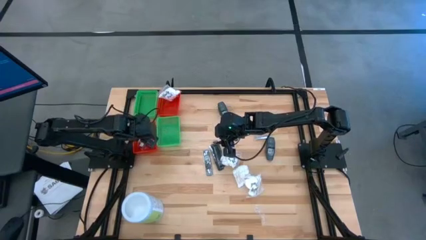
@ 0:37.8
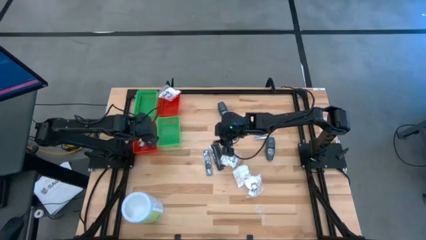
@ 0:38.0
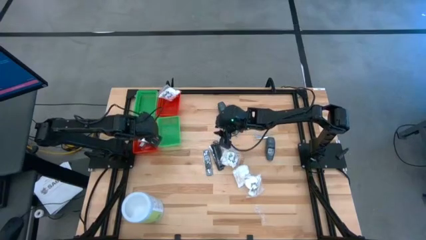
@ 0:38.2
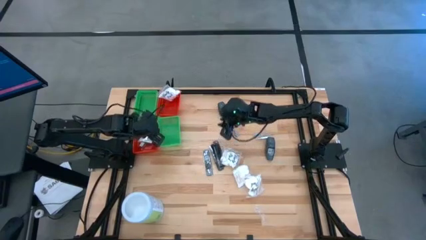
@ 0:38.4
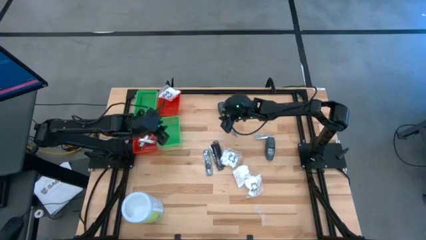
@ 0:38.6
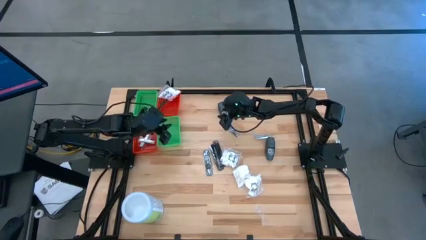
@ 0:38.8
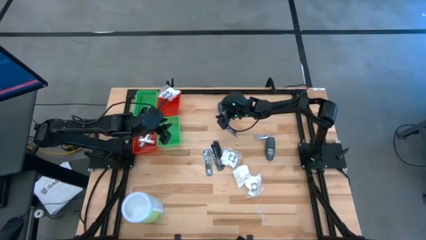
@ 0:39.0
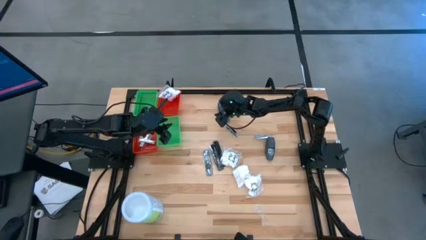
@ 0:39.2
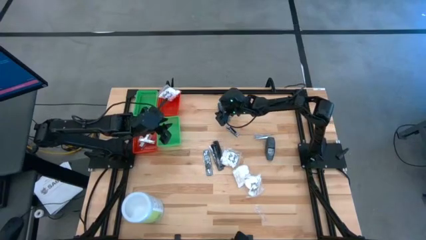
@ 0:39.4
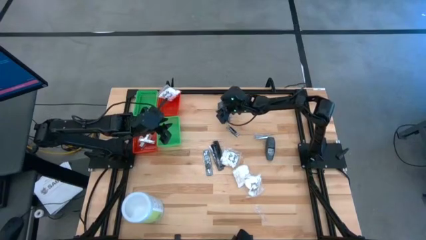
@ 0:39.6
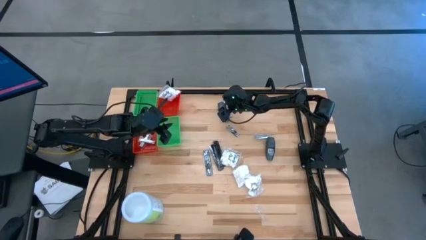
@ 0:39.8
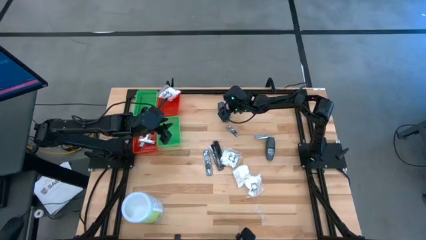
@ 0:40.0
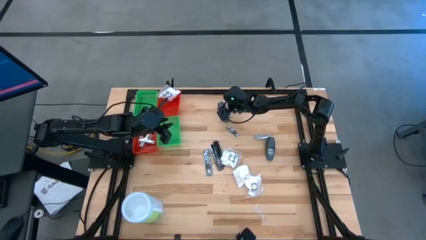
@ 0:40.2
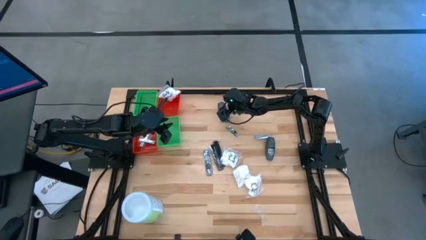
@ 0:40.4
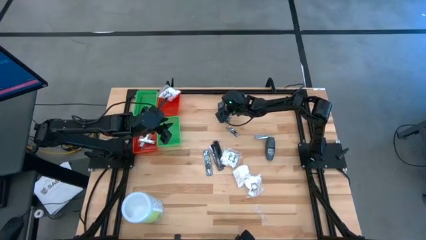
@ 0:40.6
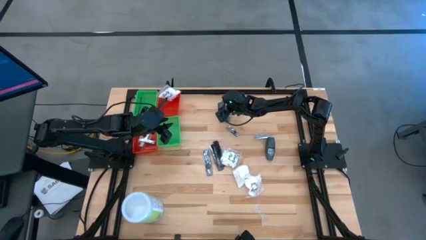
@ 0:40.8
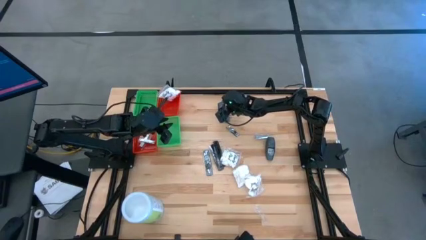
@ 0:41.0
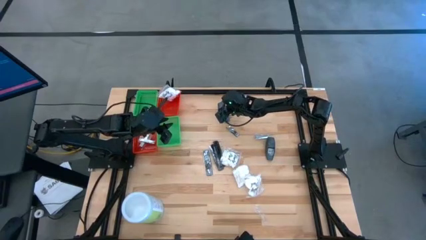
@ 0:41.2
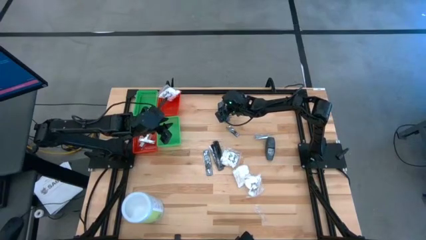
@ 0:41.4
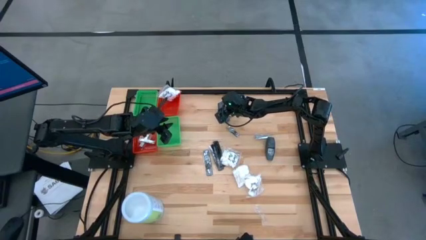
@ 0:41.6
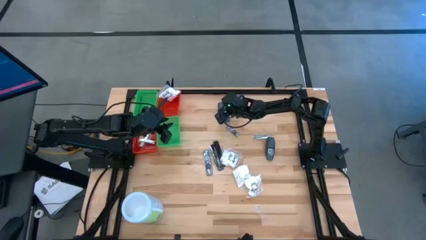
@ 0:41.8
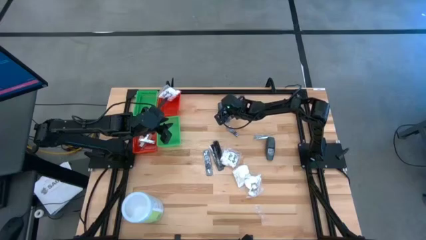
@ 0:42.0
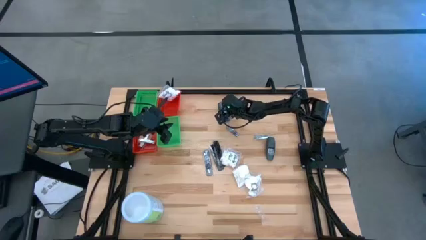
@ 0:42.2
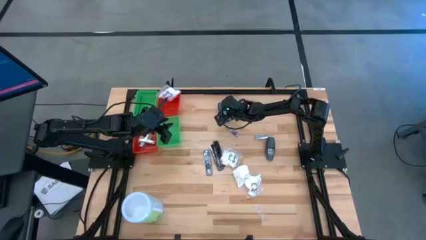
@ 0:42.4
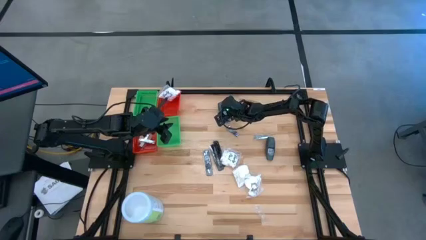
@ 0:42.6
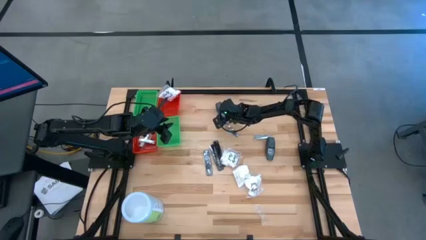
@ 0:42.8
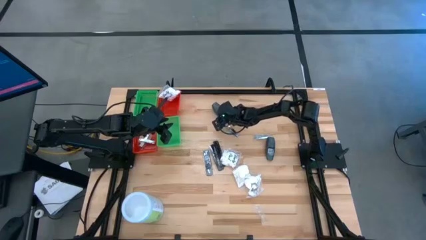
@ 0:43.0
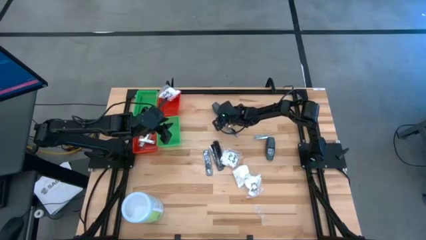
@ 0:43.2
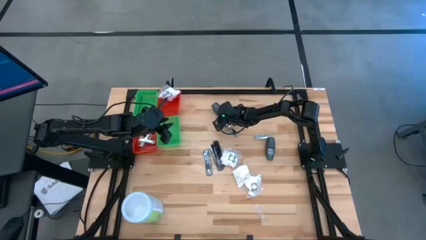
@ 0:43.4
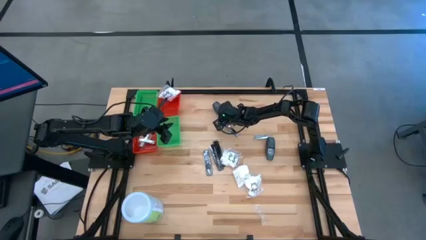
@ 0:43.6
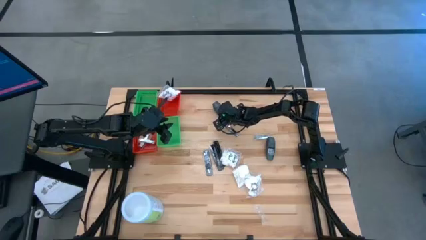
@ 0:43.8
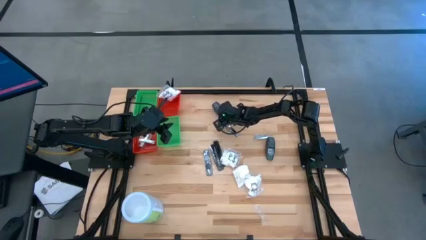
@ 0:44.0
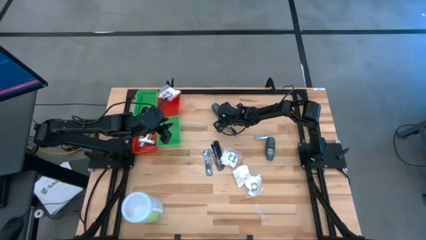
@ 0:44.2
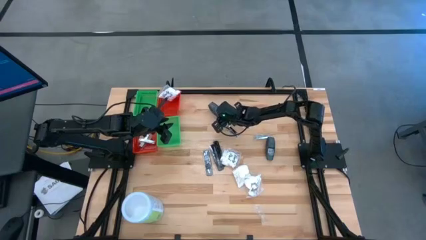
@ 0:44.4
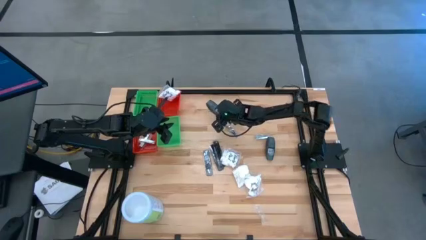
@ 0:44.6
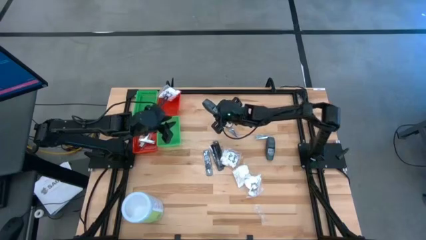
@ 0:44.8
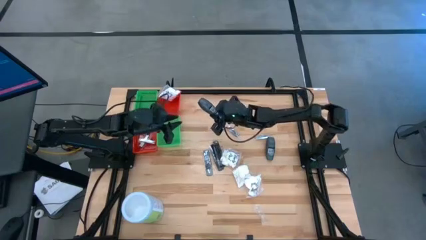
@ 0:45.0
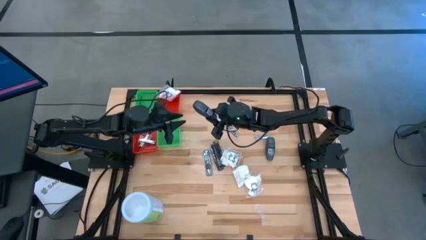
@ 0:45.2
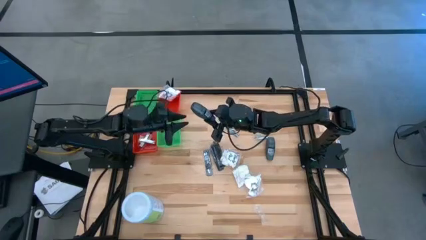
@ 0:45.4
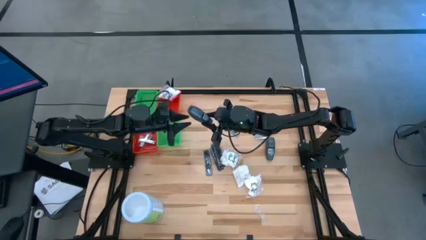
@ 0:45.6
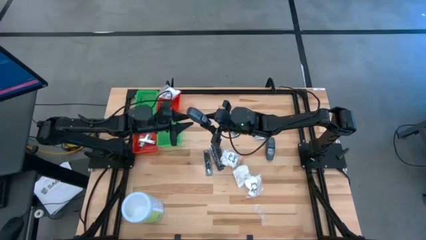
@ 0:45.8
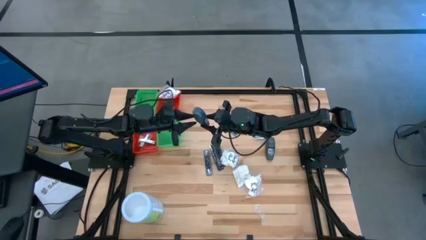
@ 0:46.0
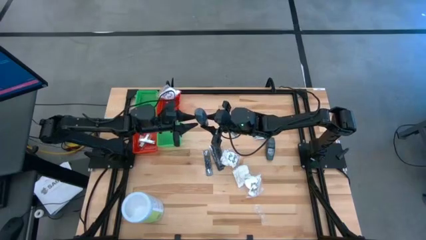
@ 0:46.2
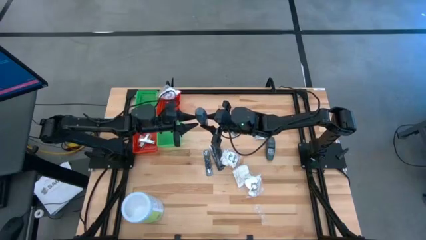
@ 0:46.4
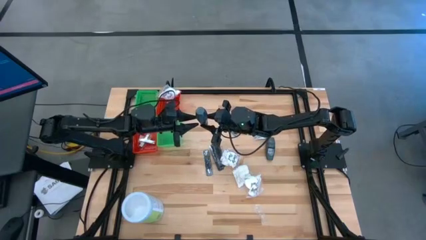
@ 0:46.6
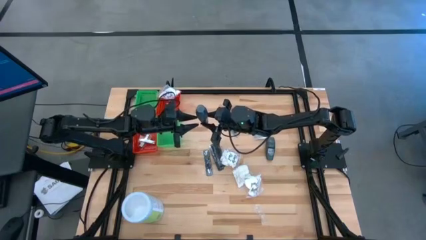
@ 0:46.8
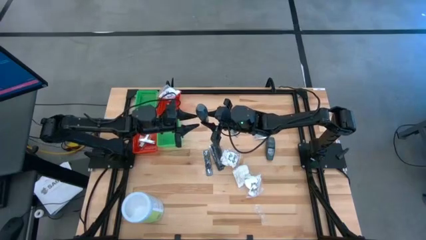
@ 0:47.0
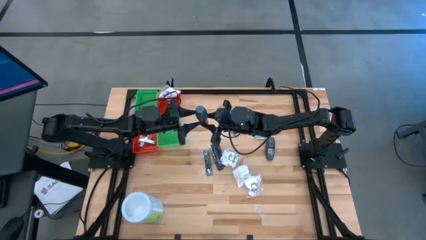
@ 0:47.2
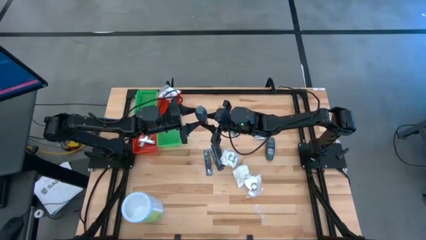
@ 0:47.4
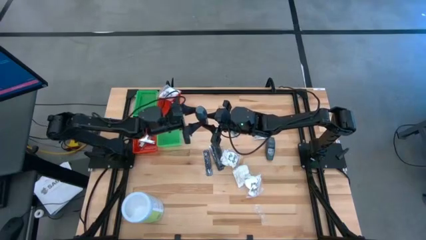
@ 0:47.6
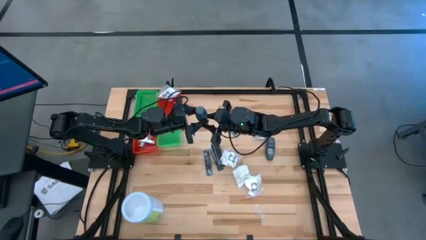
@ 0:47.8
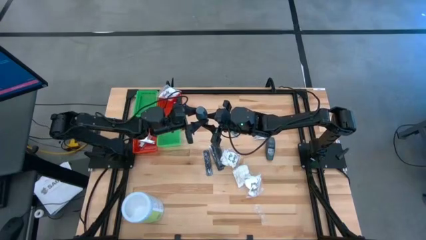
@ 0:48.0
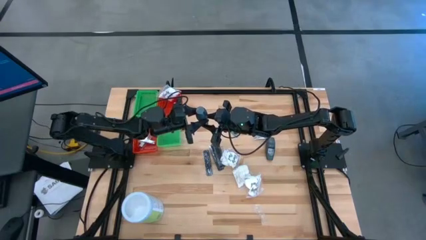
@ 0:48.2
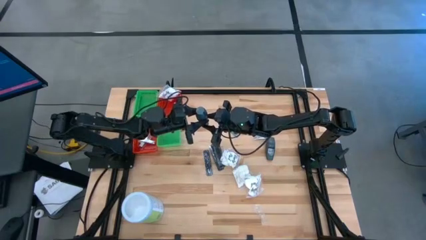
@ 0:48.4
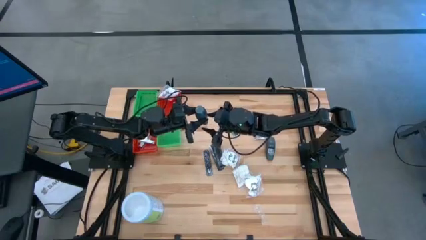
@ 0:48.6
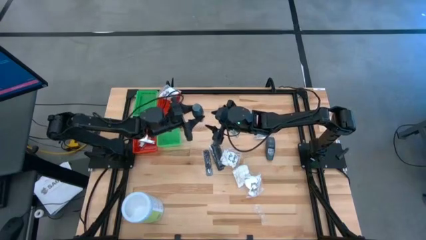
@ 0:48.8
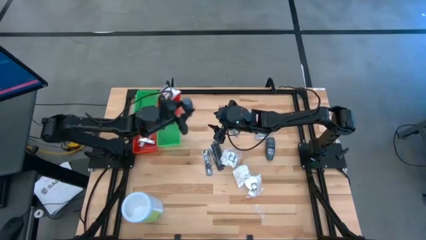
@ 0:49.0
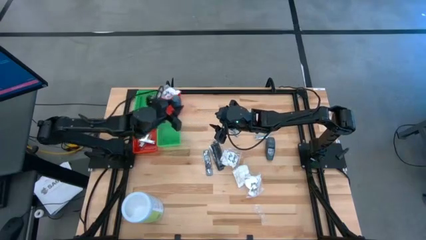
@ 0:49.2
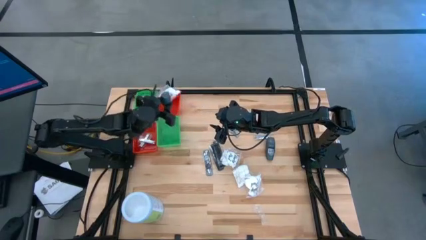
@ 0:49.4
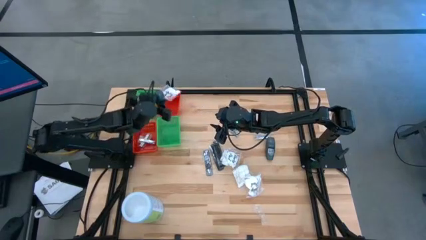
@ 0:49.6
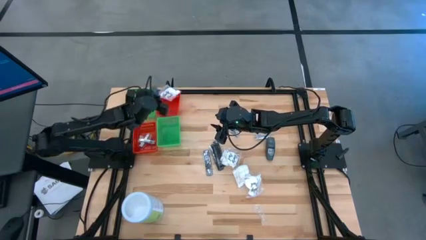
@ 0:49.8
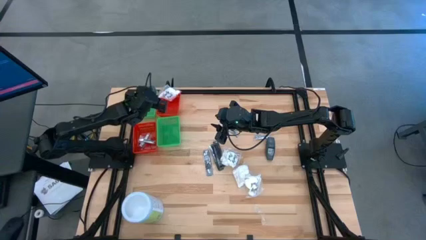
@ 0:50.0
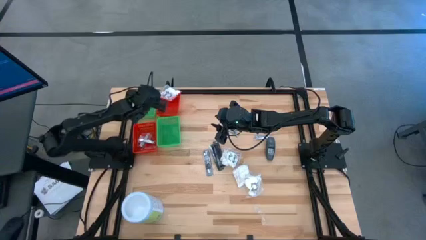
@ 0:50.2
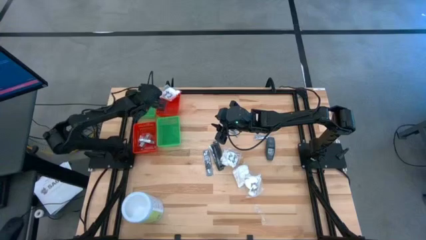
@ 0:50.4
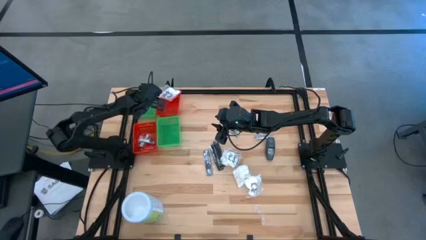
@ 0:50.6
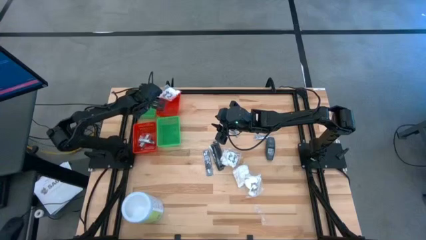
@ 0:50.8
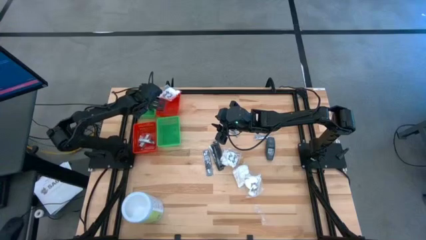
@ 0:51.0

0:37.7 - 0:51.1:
Task: Pick & Place Travel size toiletries
Put the left gray deodorant into the top green bin
